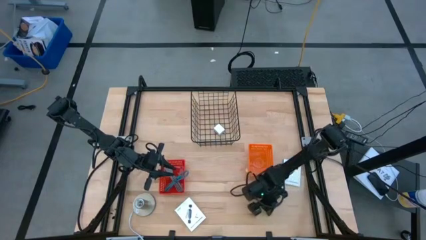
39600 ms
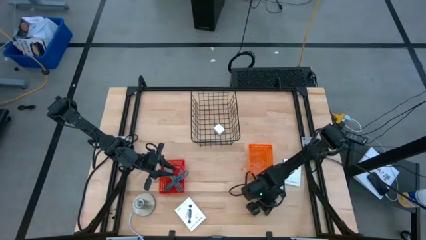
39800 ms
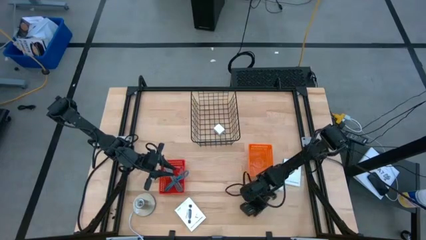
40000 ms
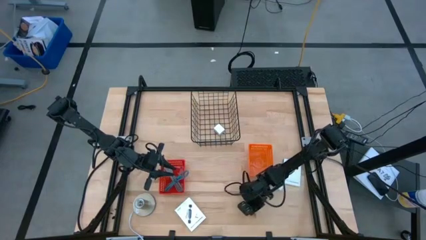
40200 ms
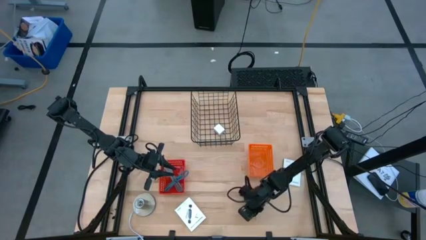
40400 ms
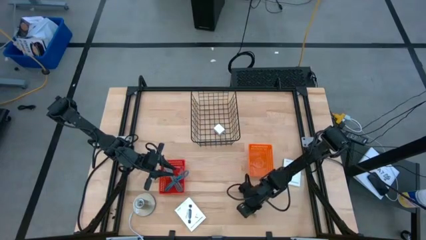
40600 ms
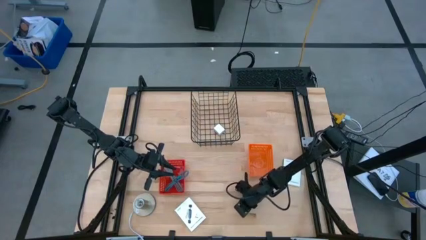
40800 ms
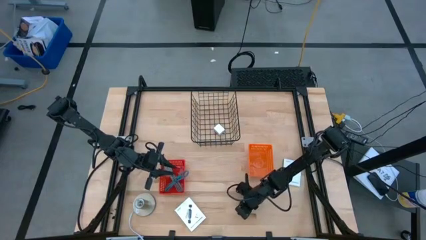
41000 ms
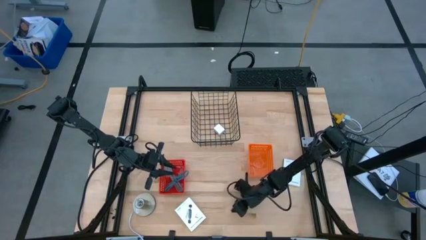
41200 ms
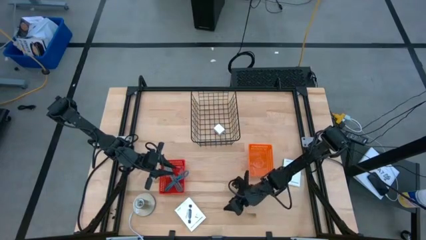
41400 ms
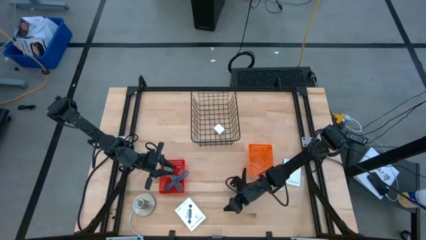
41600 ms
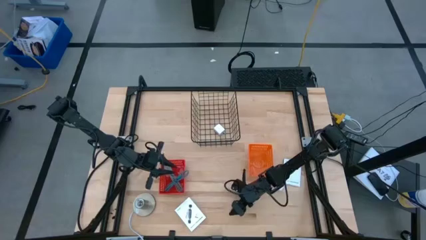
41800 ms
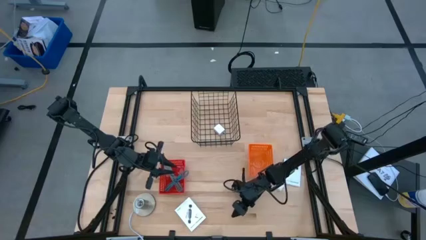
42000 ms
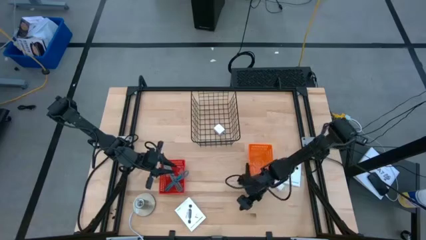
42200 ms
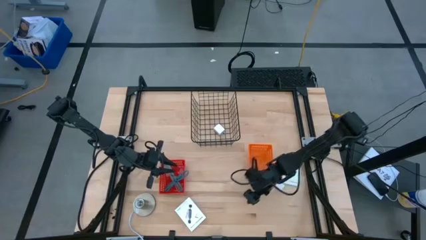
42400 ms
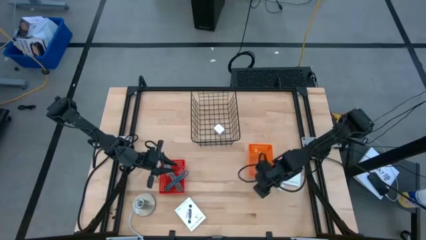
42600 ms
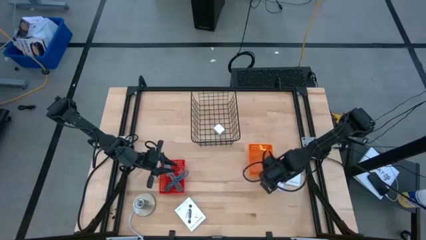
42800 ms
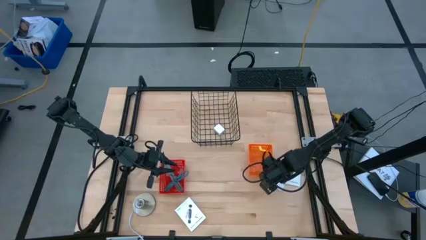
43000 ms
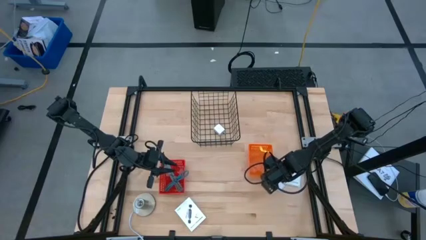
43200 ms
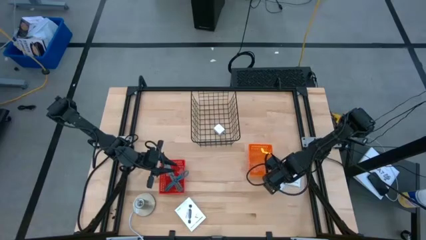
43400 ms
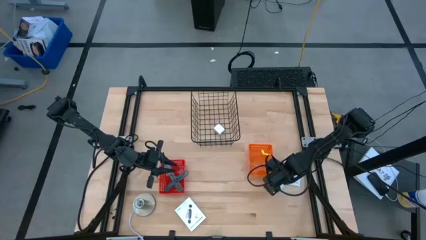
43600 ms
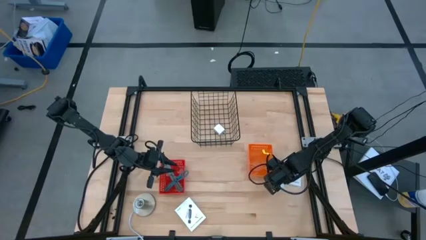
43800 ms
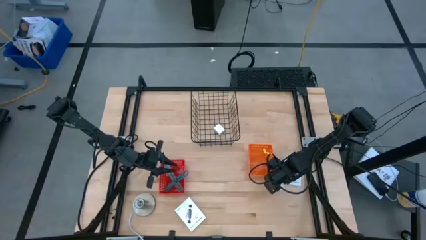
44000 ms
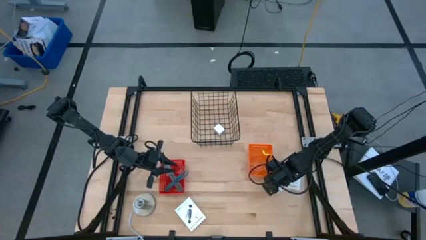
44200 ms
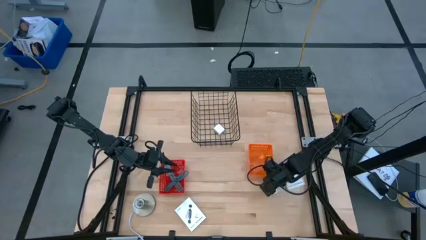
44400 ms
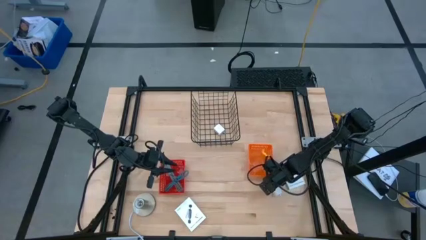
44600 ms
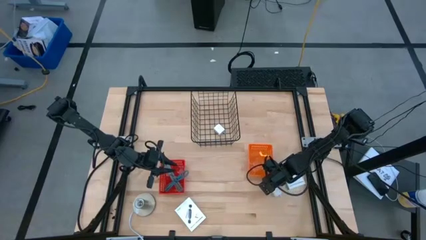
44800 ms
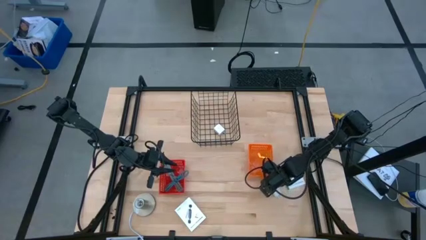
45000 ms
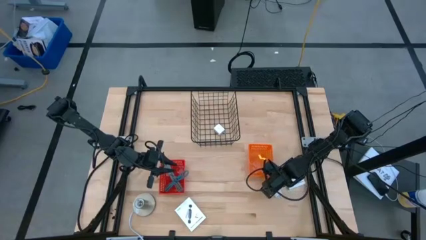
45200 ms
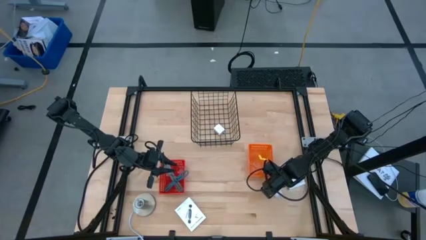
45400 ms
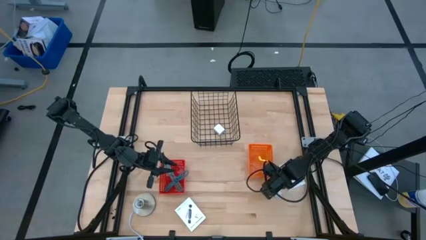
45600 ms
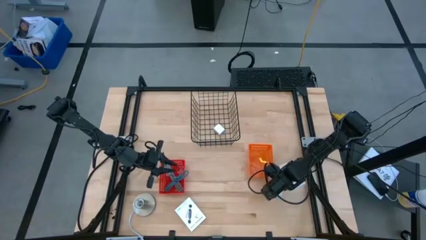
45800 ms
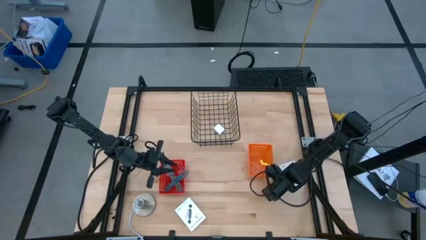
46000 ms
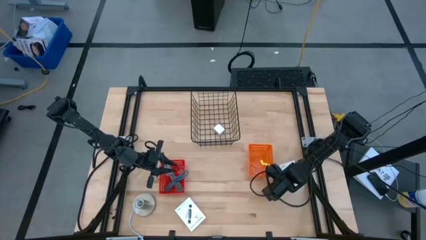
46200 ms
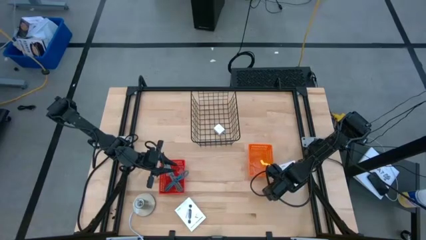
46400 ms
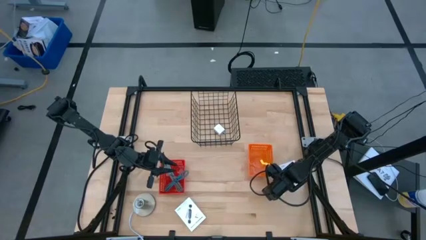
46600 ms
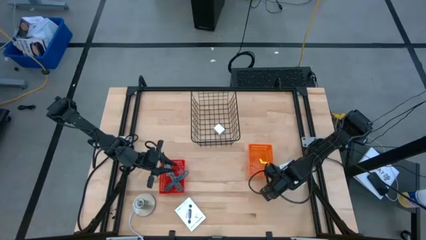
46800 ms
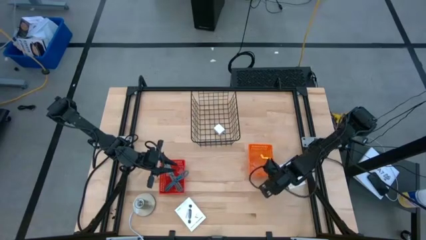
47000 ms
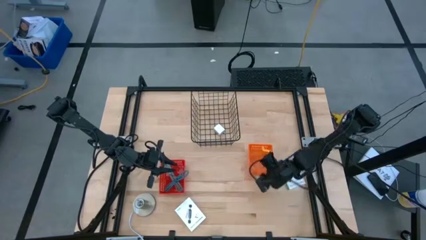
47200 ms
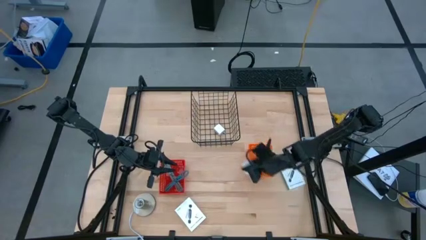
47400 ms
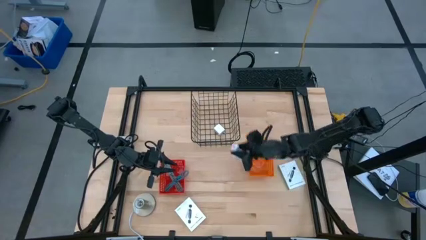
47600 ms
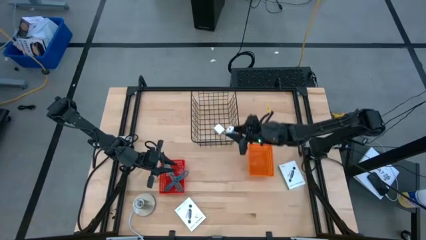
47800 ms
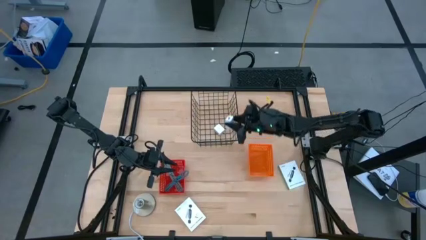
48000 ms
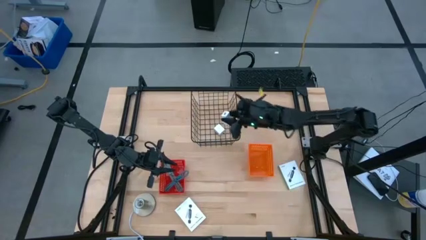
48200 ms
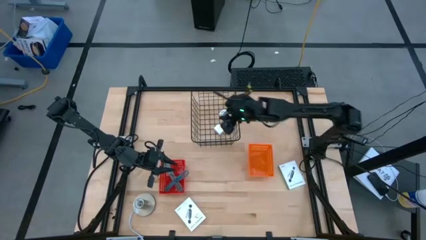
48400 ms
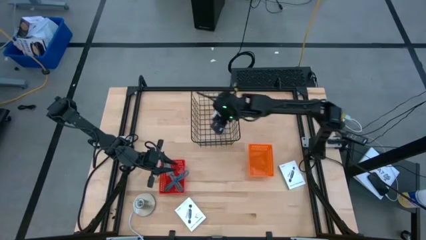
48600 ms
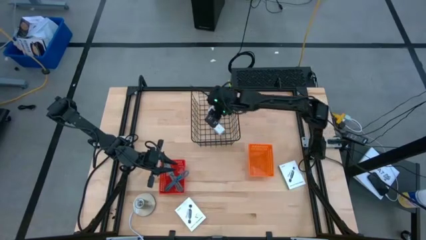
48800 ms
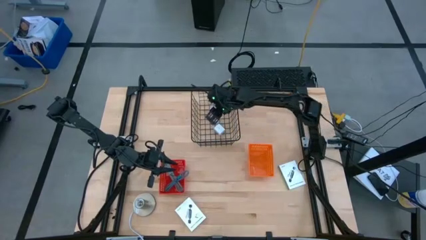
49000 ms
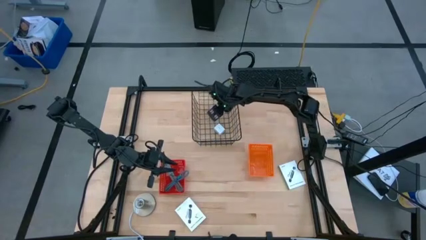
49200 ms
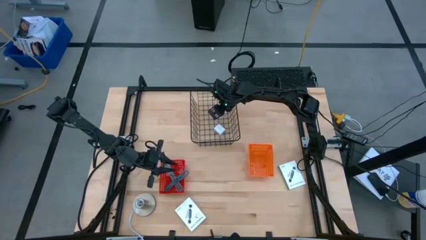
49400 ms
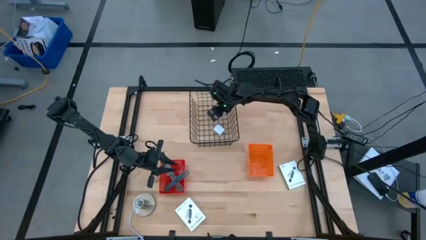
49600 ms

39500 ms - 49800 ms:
Task: Pick and place items into bin
Put the white charger adapter into the black wire basket
